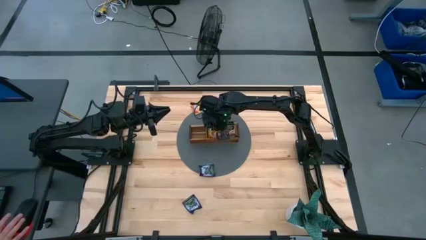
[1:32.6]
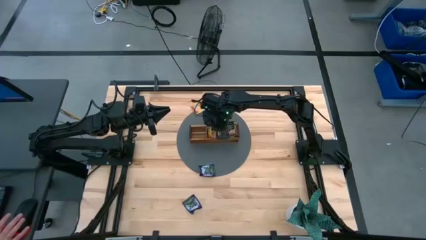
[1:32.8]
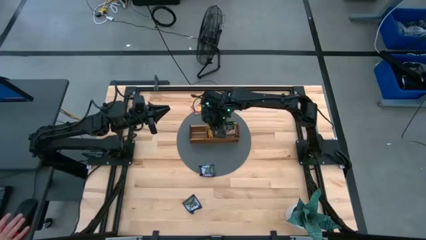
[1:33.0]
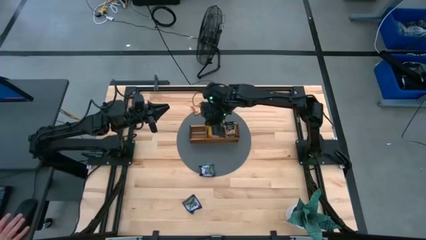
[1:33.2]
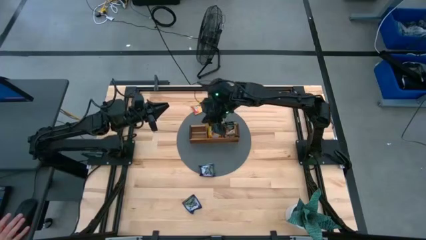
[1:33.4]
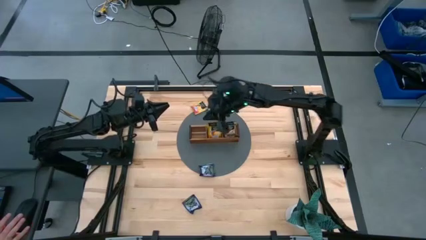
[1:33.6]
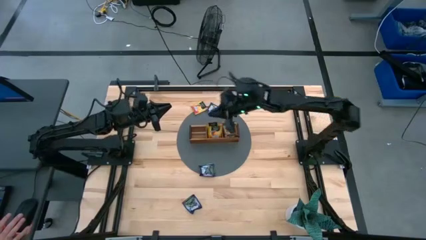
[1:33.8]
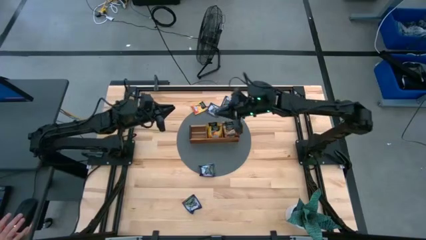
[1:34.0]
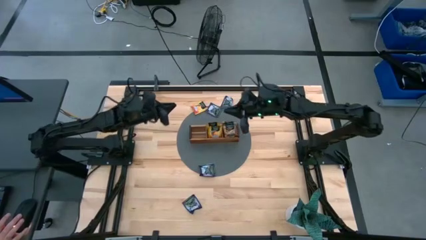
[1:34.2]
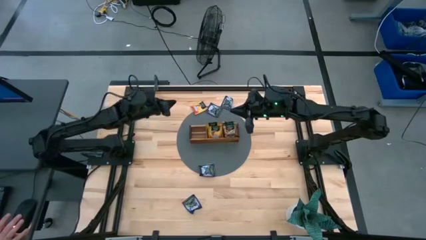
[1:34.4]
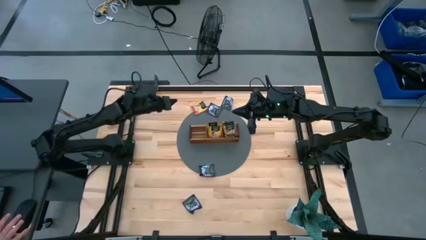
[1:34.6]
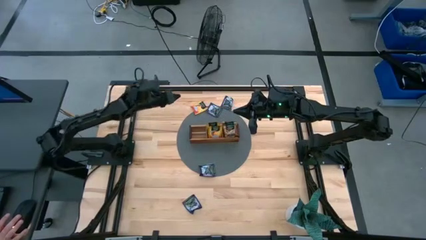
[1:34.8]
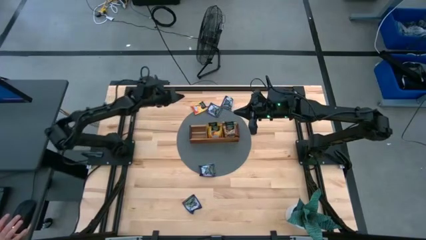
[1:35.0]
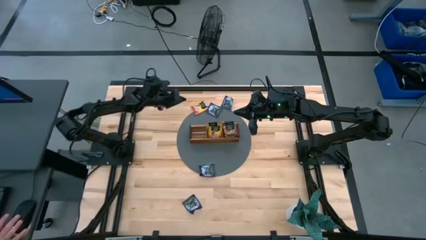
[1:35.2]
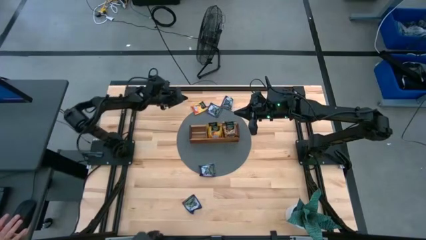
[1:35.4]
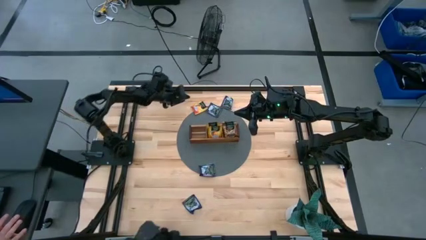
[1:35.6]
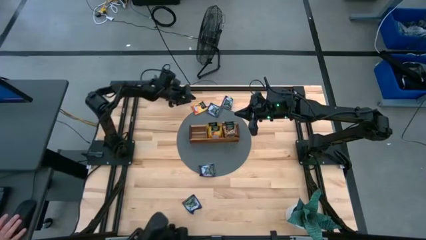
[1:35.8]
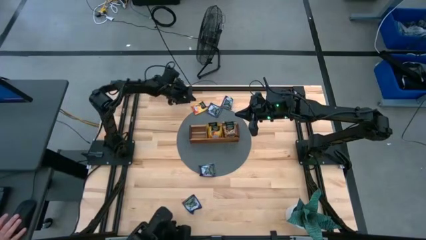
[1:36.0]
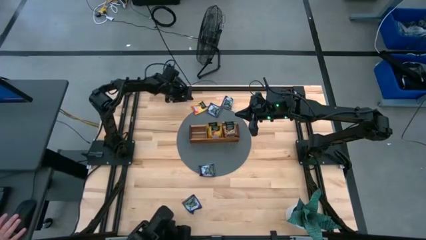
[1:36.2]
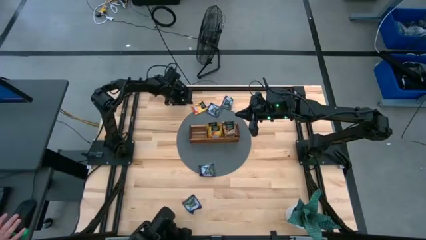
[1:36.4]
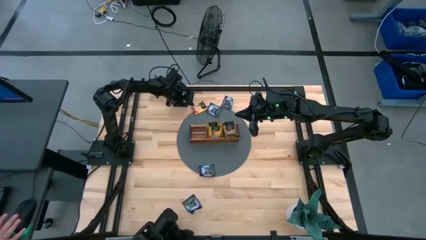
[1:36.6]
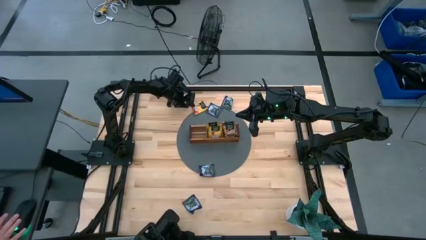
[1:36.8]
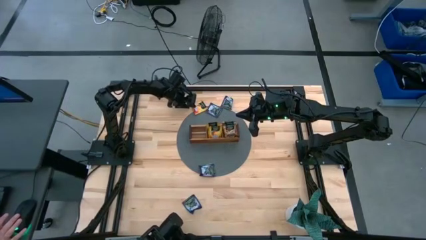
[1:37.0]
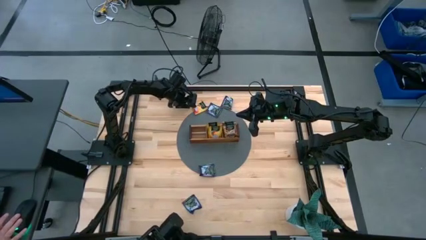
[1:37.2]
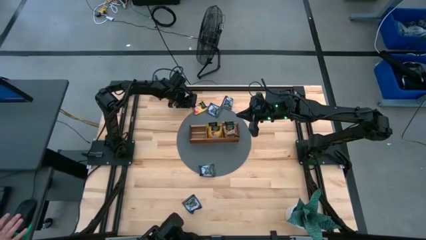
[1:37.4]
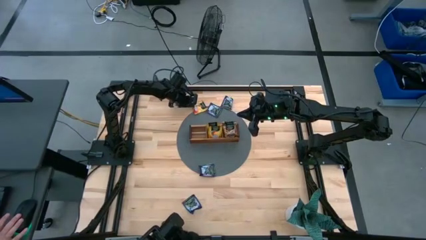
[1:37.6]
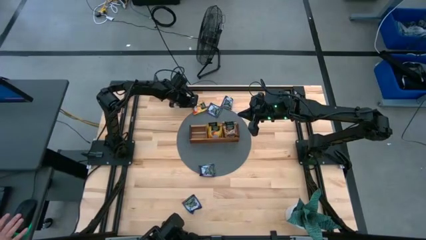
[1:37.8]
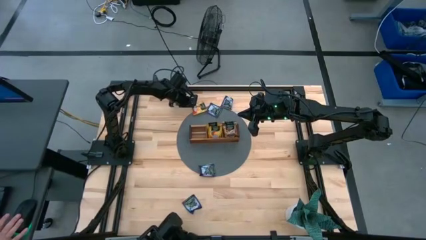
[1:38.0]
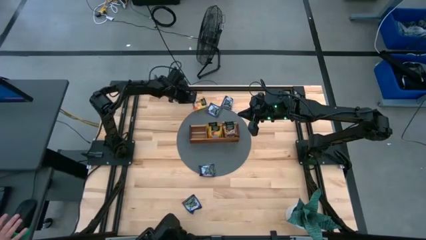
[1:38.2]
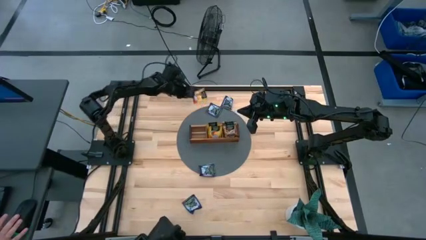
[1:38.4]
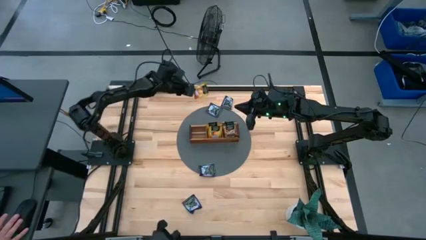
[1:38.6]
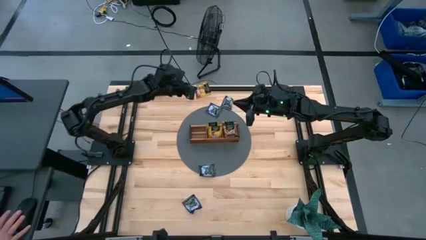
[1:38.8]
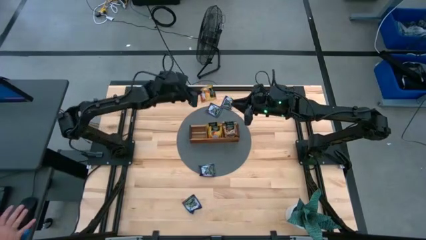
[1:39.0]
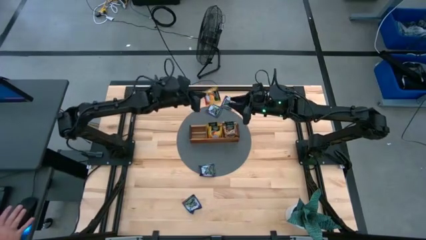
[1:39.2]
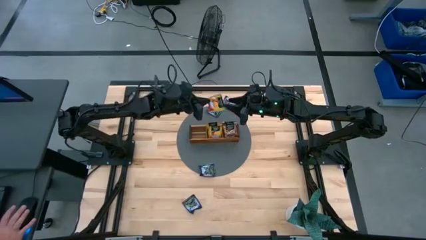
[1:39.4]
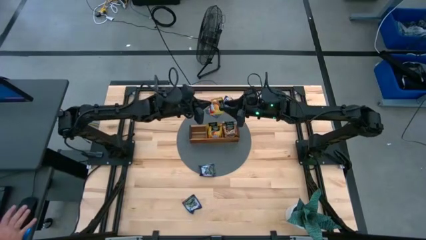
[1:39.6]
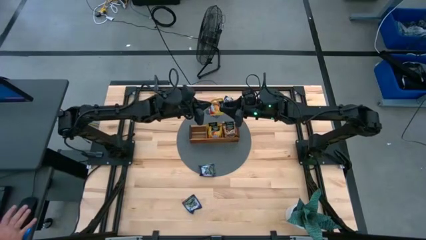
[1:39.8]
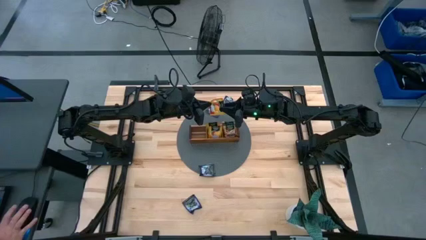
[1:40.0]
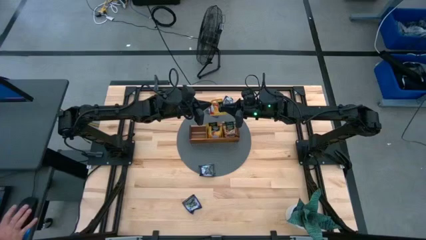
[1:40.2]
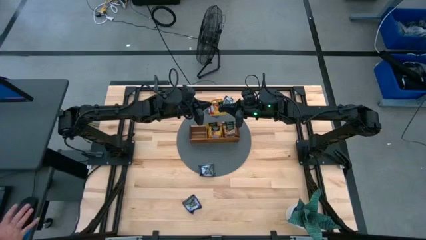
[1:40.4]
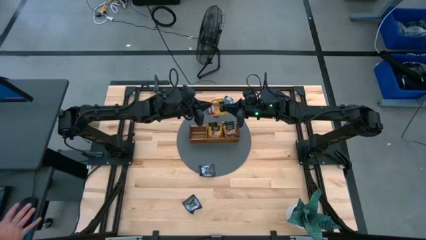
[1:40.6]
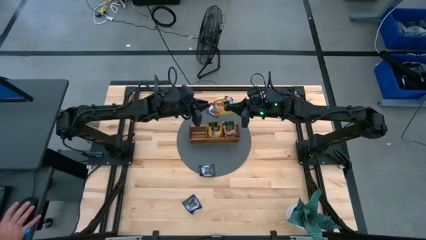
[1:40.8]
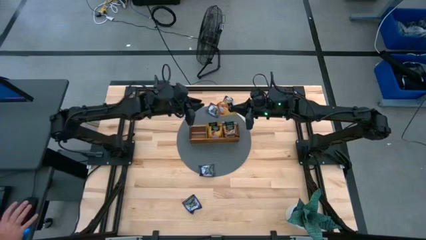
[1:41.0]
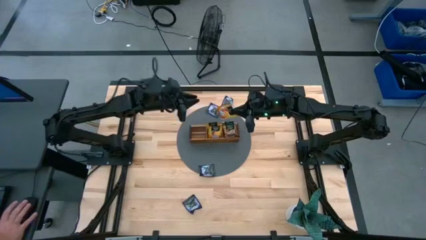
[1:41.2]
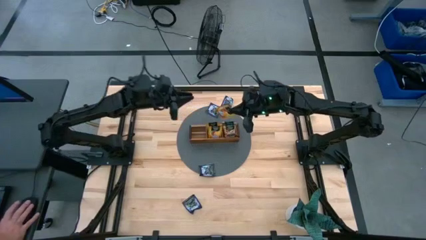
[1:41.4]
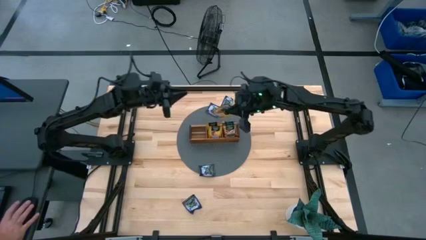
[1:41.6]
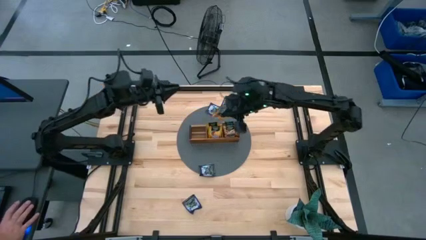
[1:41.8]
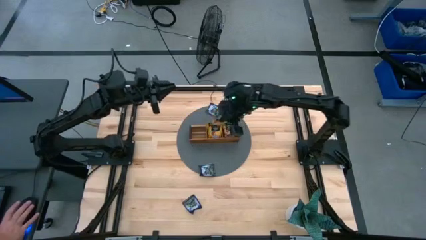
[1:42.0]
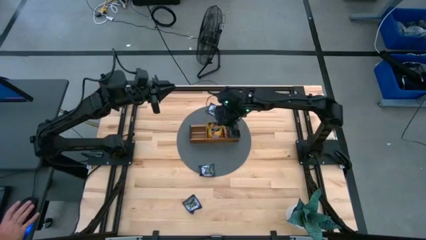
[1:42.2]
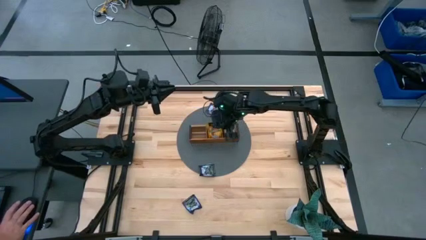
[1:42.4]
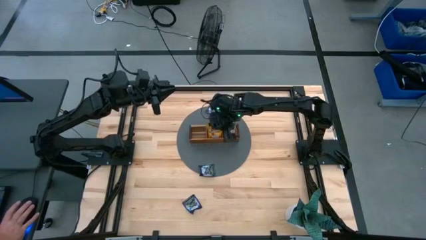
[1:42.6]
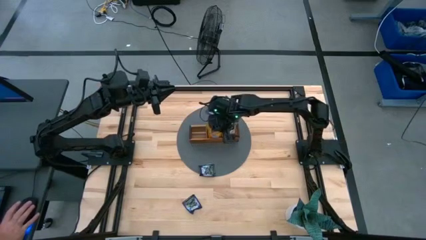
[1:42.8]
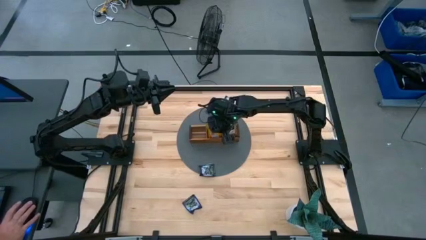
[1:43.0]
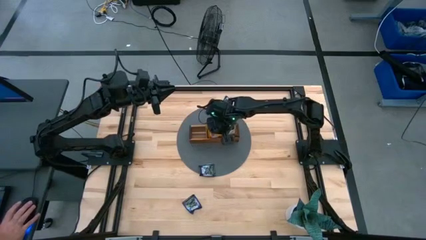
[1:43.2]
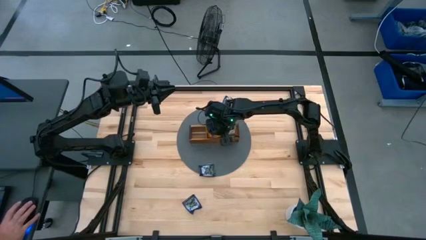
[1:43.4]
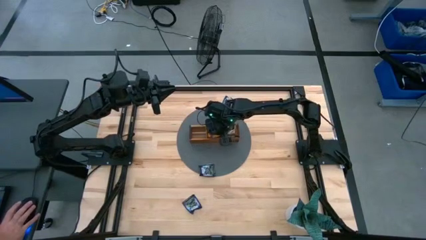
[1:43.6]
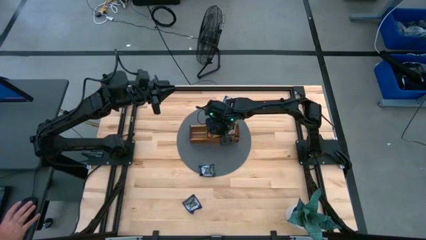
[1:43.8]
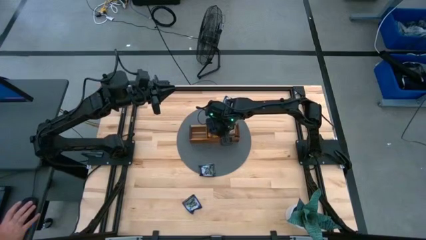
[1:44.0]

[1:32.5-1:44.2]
Task: Pick & Place Tea
Put the yellow tea bag into the middle section of the wooden organizer
